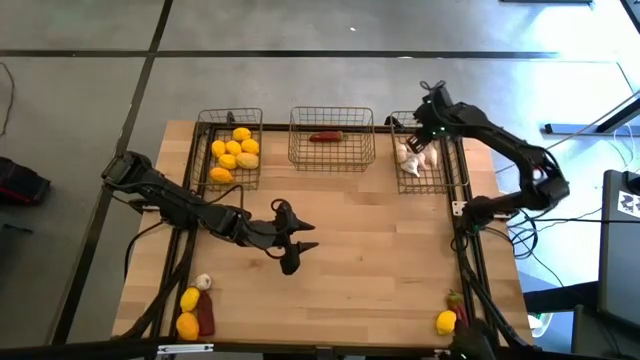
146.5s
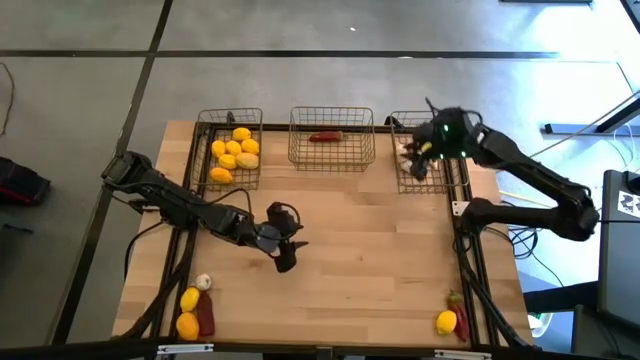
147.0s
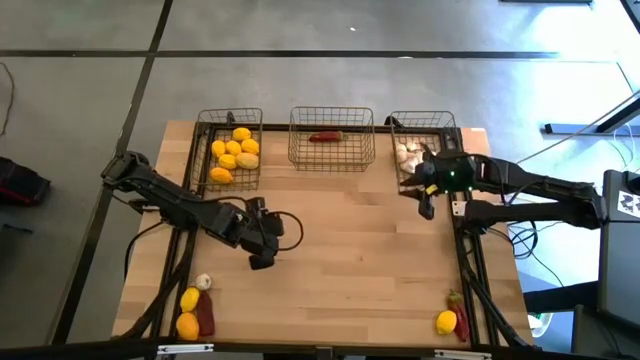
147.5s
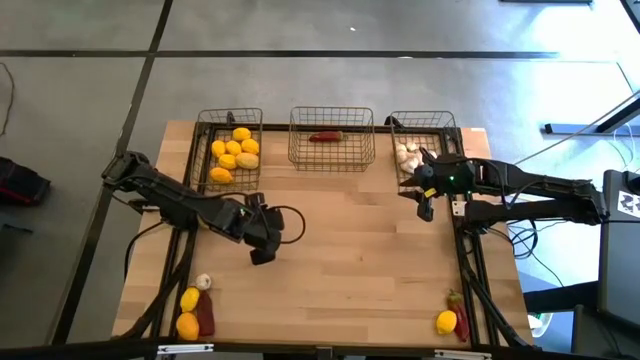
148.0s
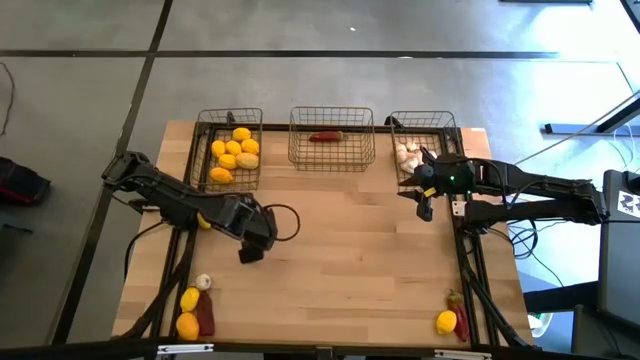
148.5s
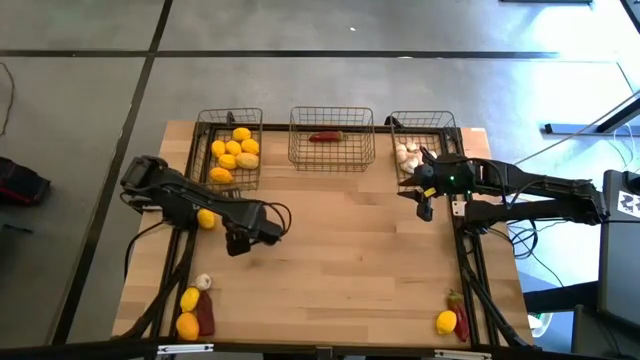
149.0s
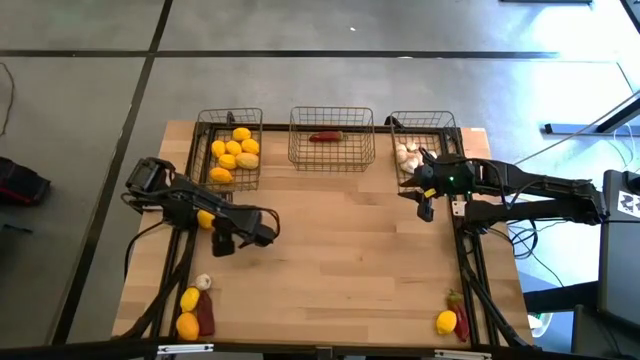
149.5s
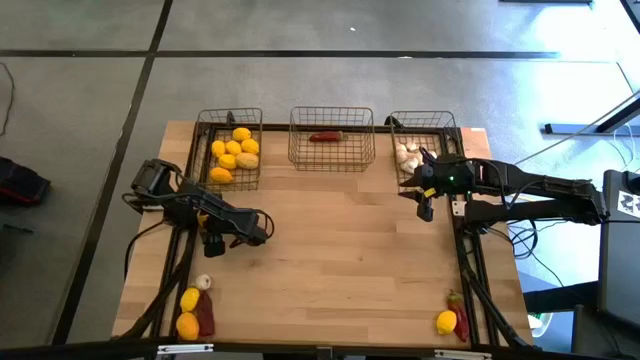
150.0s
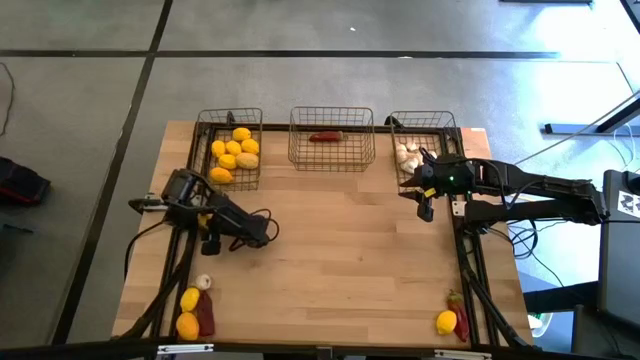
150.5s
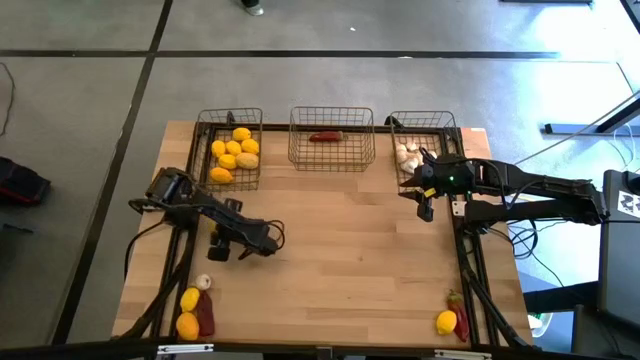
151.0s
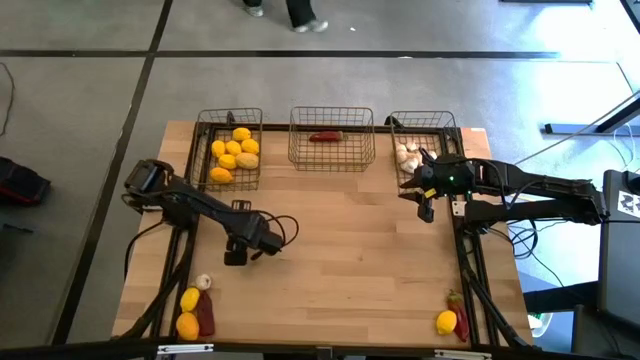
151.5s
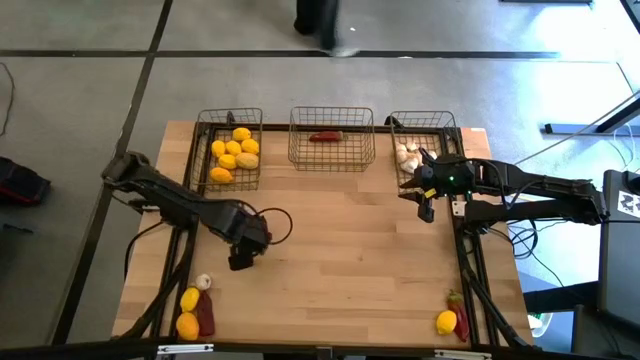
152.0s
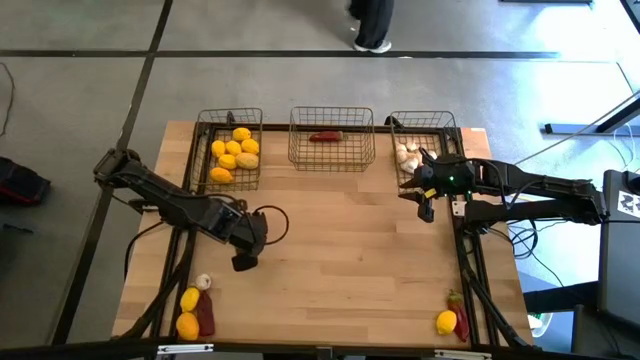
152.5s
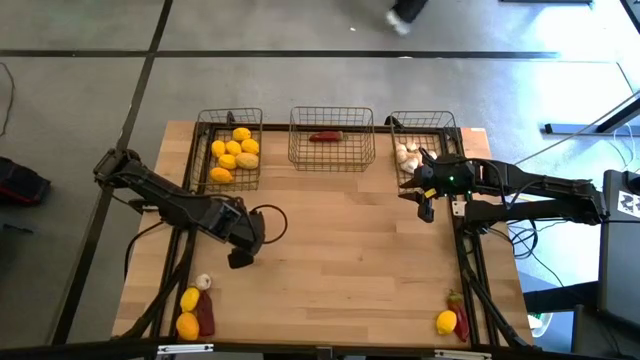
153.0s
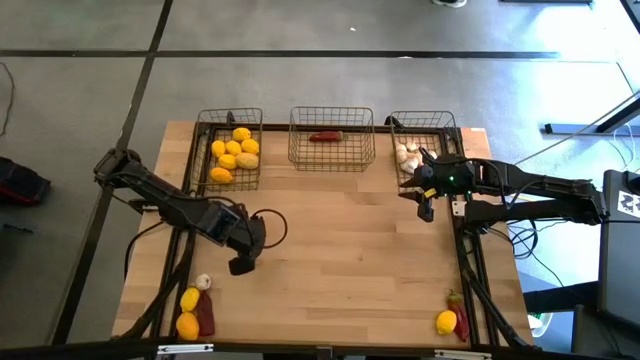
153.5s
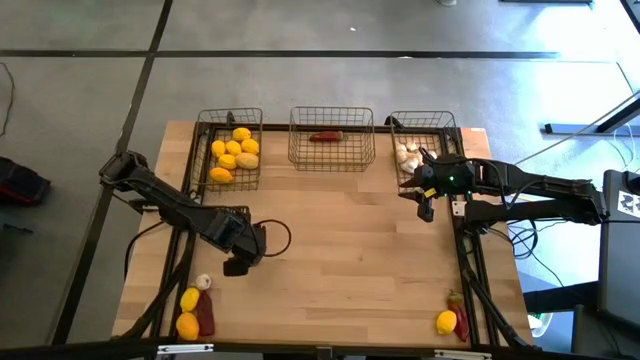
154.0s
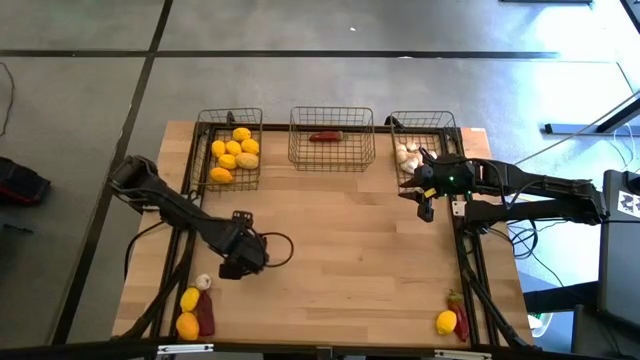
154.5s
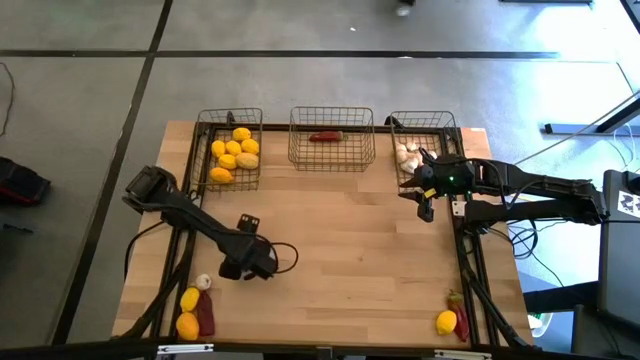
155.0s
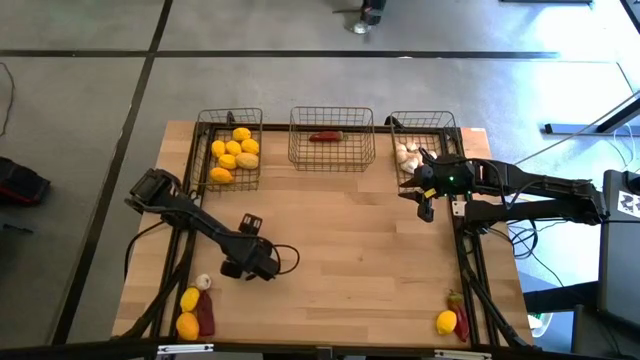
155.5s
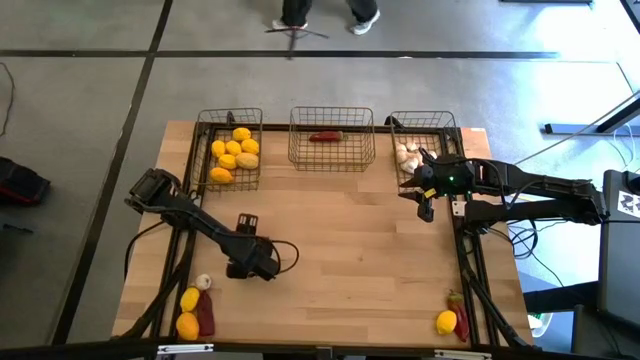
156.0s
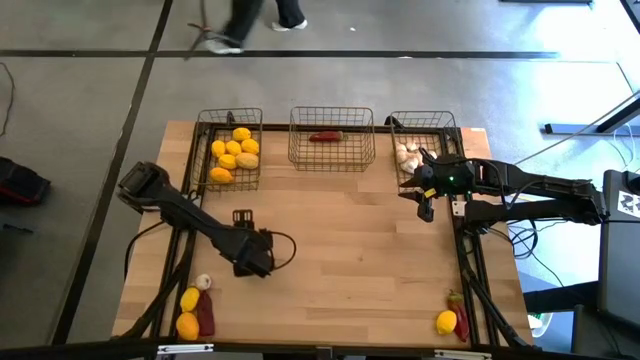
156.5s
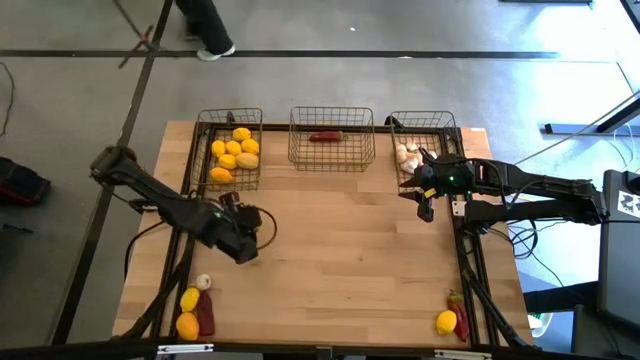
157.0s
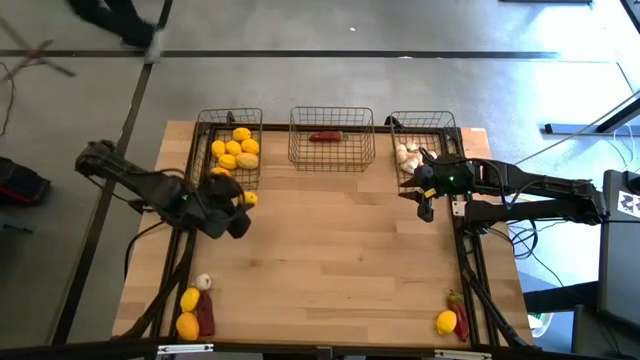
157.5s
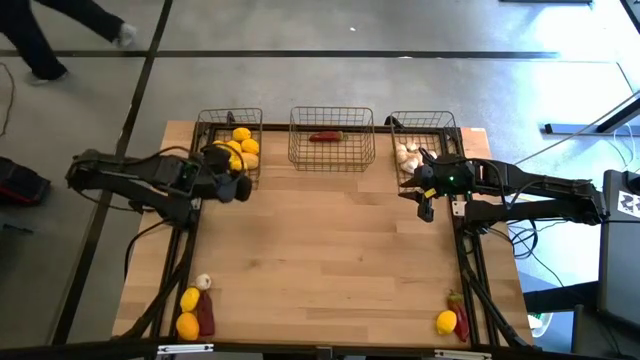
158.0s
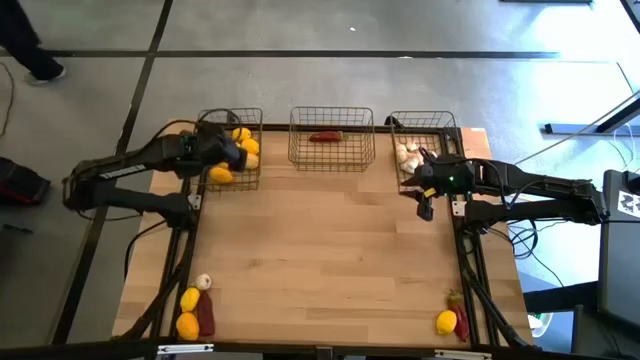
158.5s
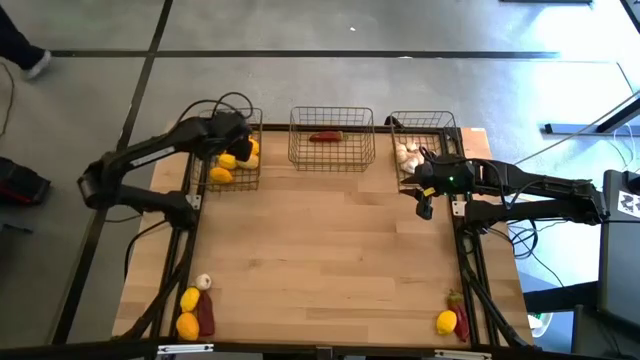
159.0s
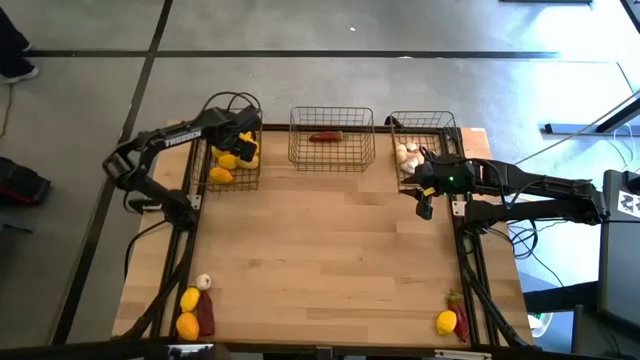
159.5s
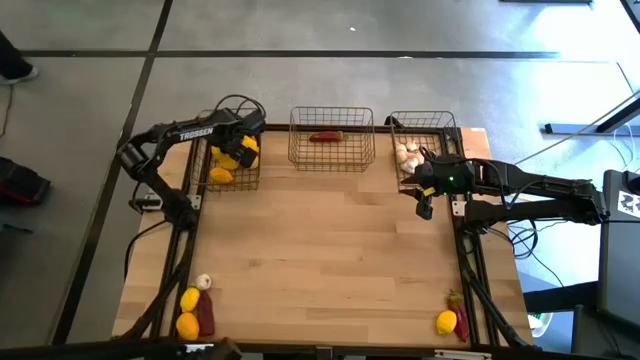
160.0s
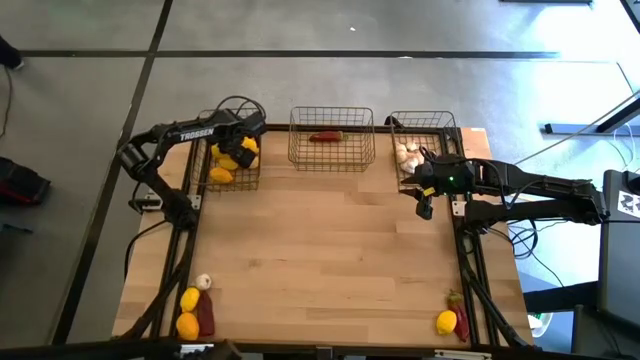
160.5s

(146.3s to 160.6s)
Task: Sort produce into baskets
Put the yellow lemon into the left gold wire basket

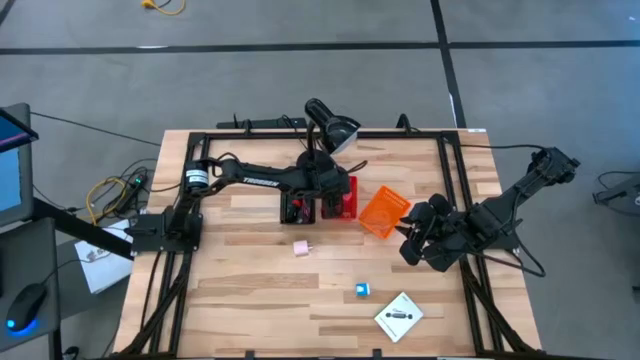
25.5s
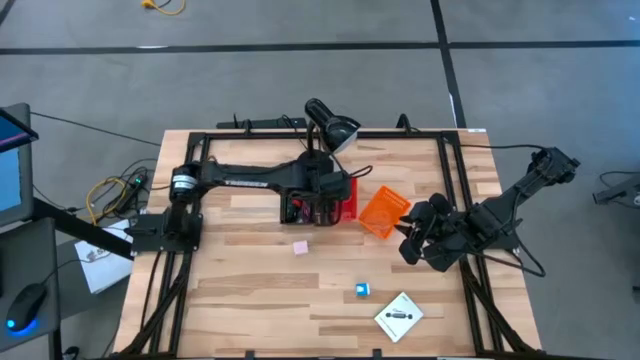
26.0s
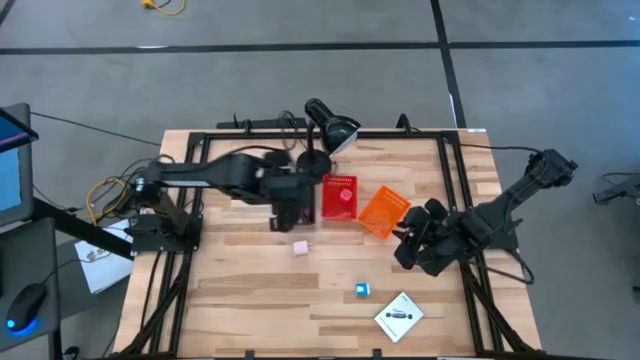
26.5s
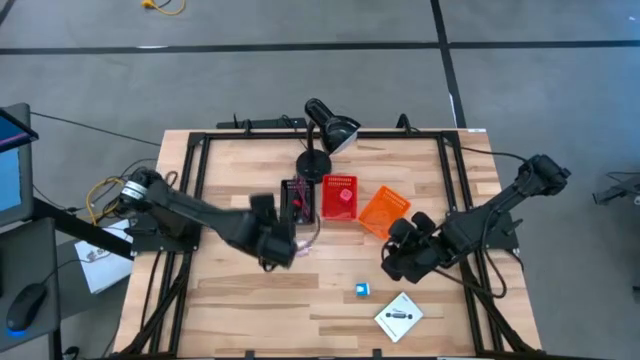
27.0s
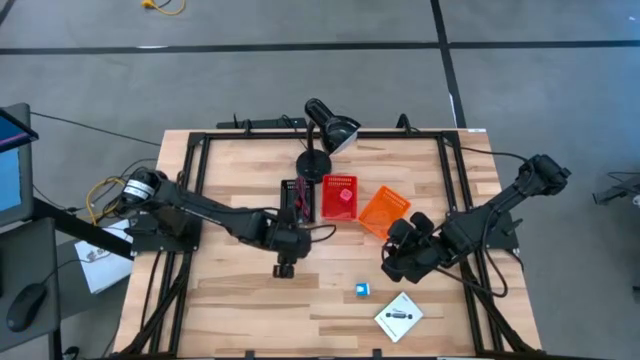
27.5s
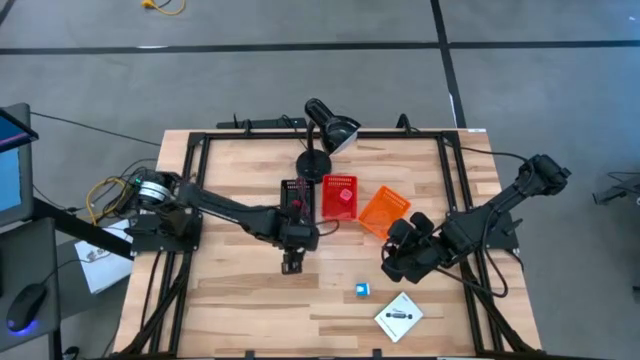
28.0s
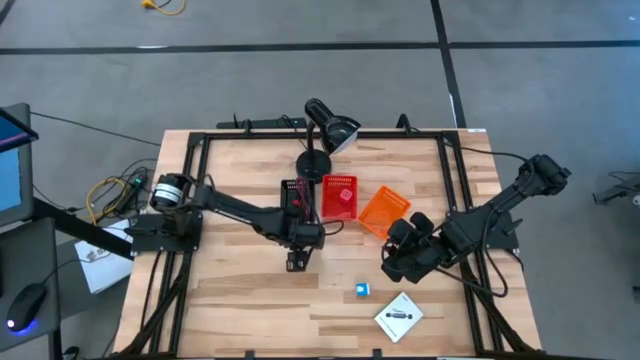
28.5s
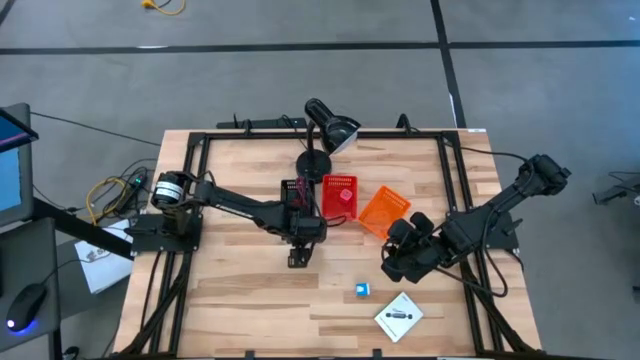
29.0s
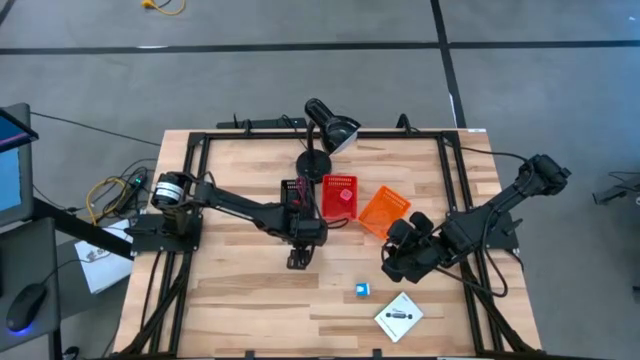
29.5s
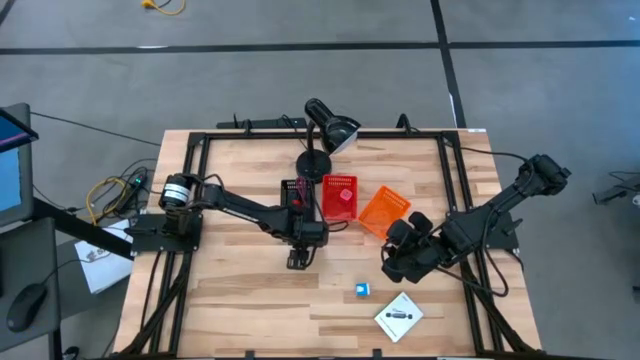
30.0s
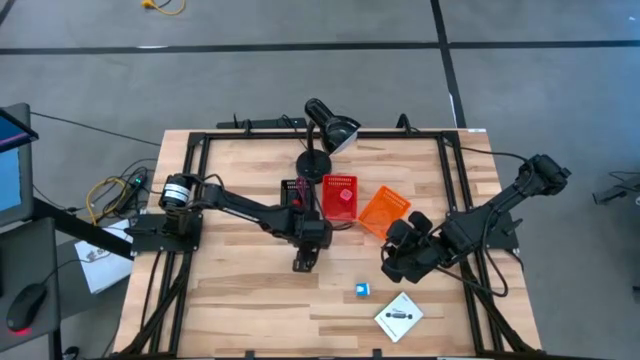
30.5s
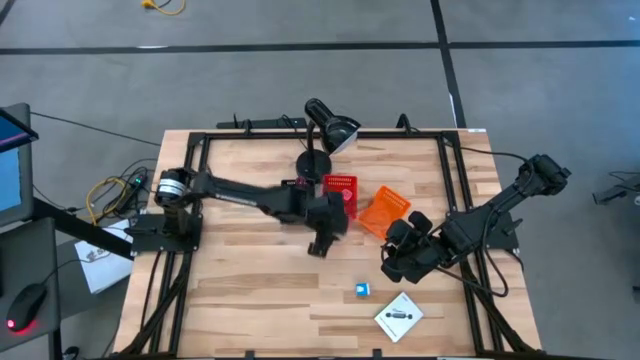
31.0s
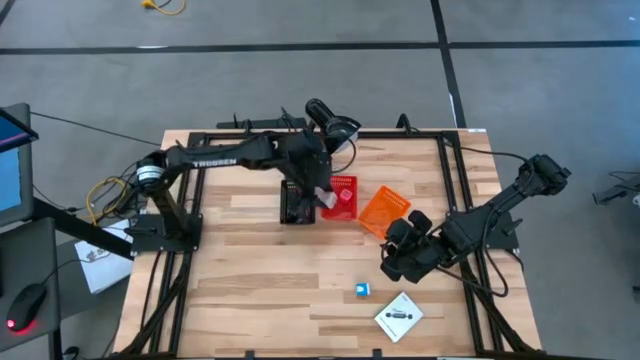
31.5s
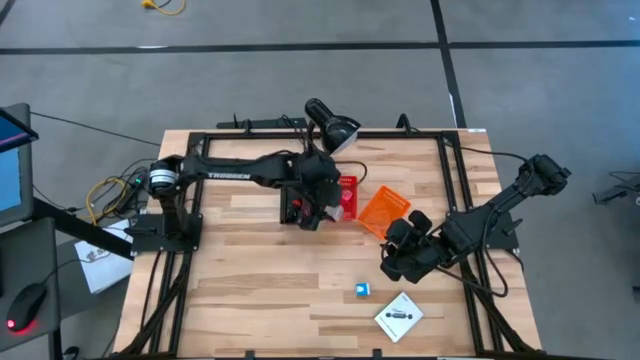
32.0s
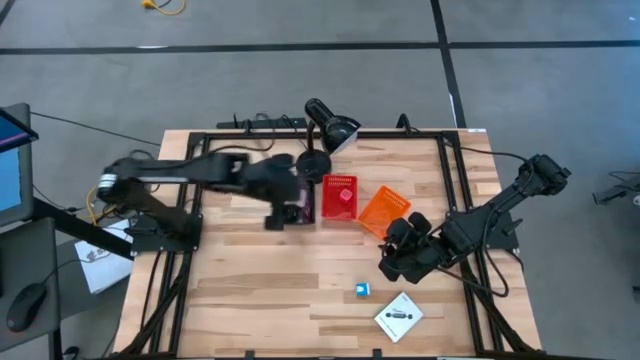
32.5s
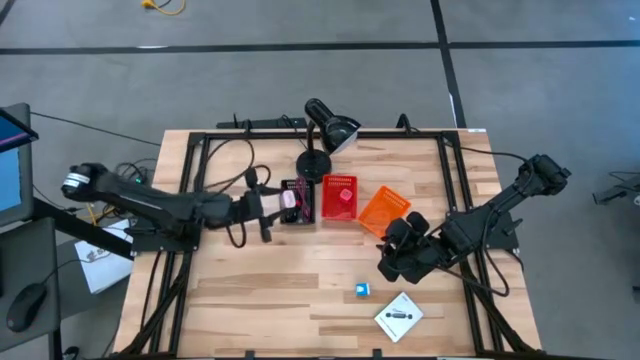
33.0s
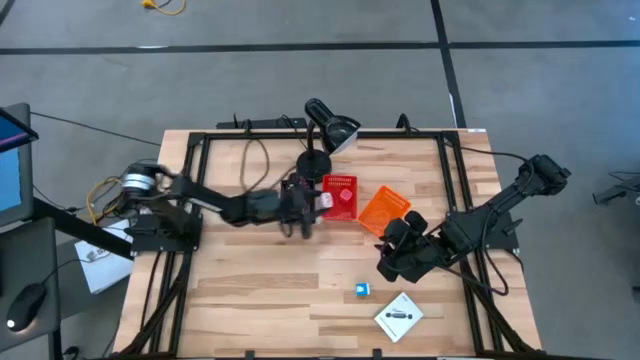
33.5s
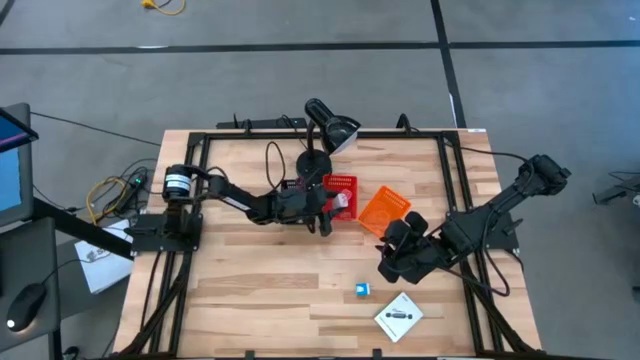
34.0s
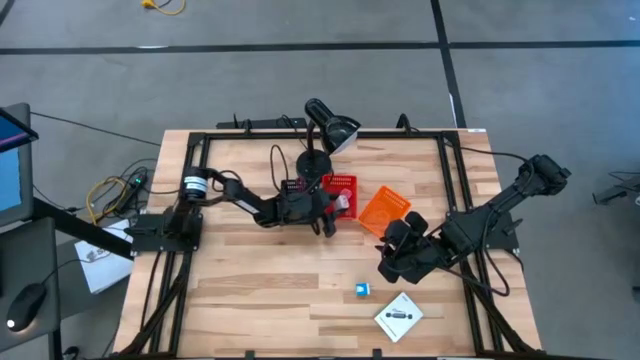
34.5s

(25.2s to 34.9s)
Task: Pick and place items into bin
Put the white charger adapter into the red bin
